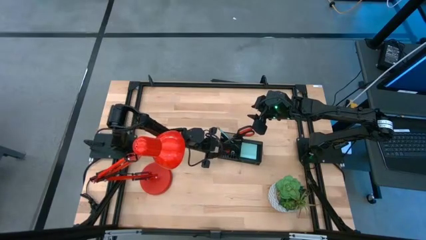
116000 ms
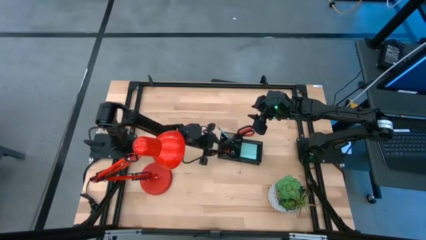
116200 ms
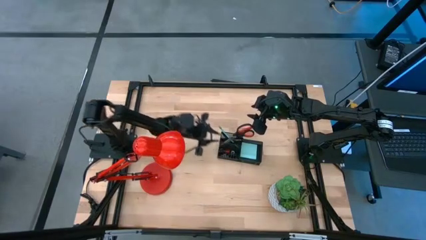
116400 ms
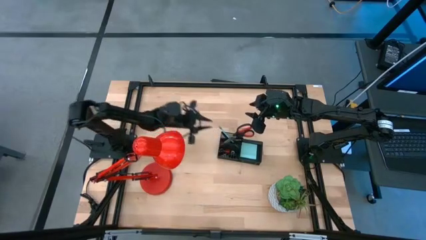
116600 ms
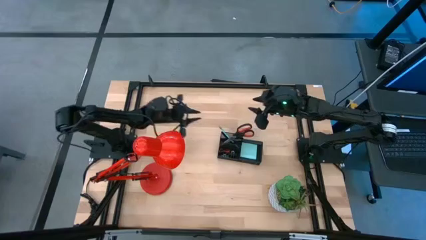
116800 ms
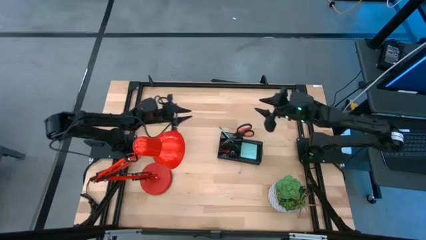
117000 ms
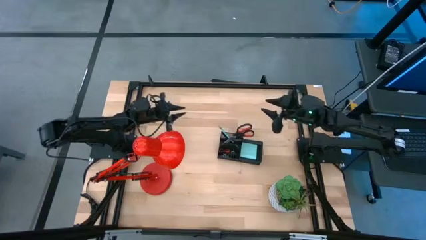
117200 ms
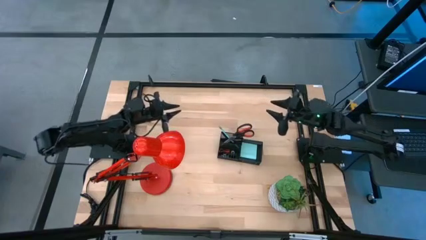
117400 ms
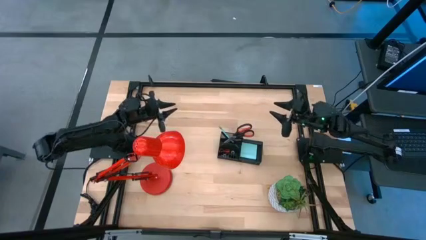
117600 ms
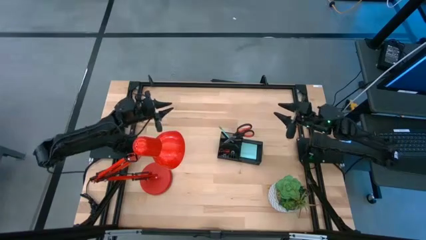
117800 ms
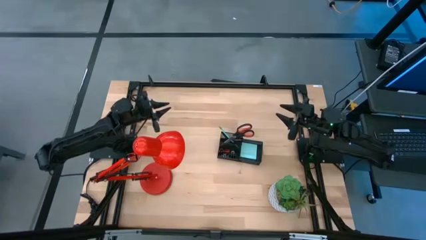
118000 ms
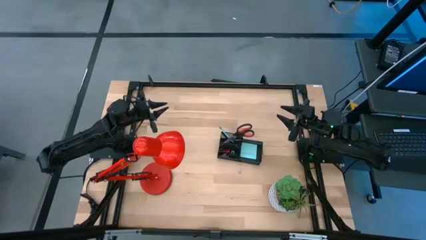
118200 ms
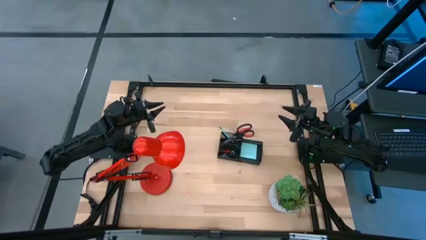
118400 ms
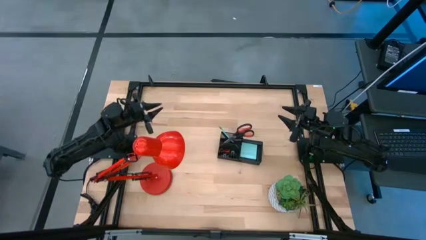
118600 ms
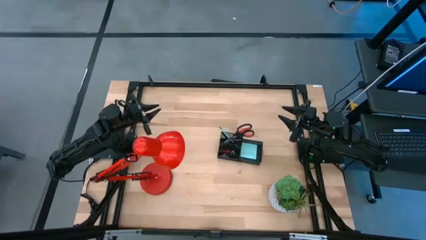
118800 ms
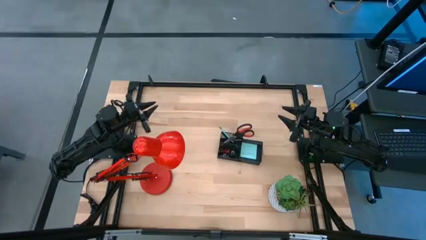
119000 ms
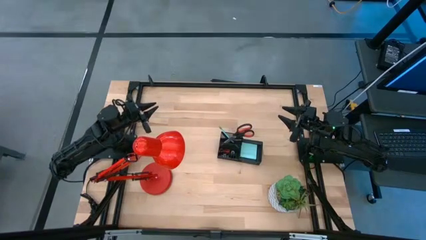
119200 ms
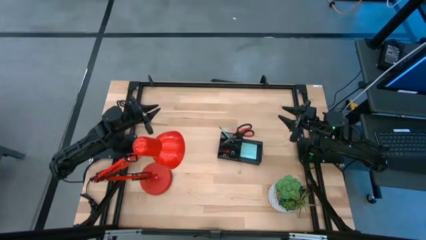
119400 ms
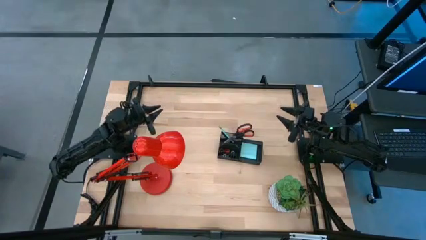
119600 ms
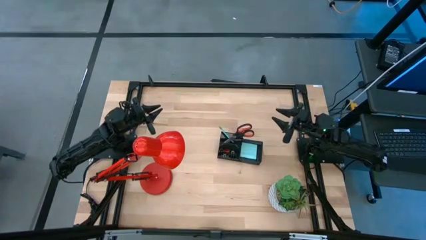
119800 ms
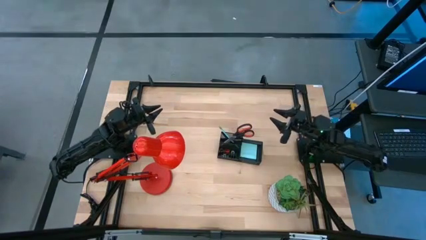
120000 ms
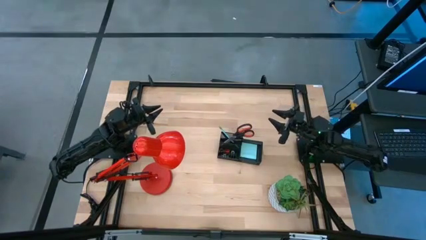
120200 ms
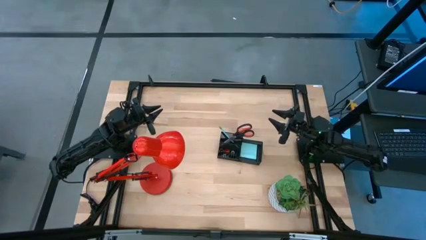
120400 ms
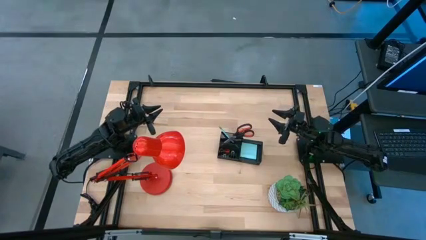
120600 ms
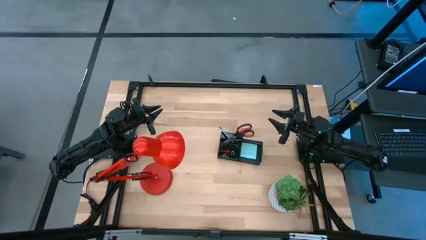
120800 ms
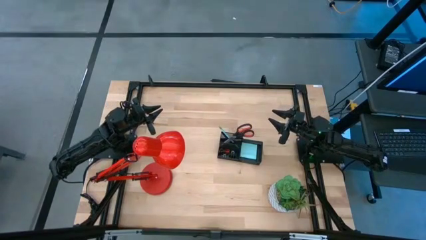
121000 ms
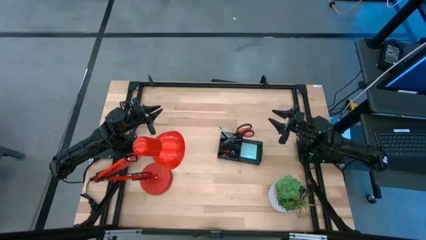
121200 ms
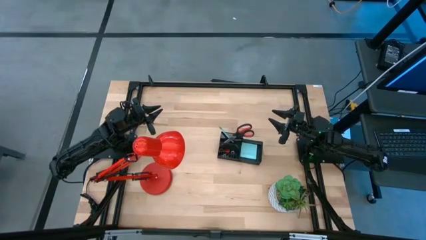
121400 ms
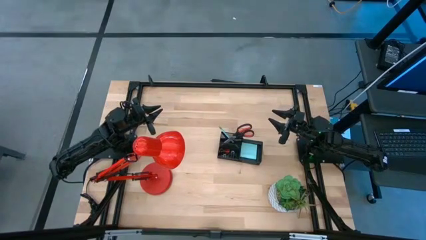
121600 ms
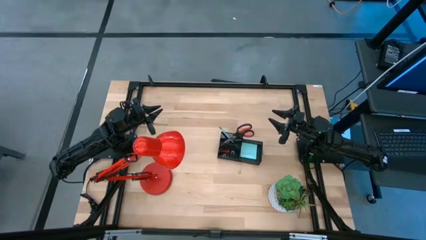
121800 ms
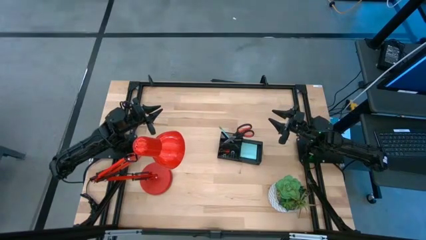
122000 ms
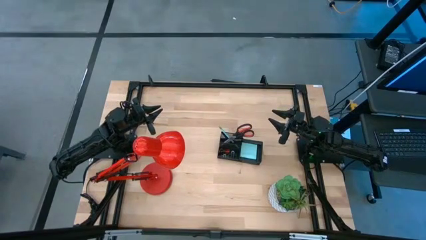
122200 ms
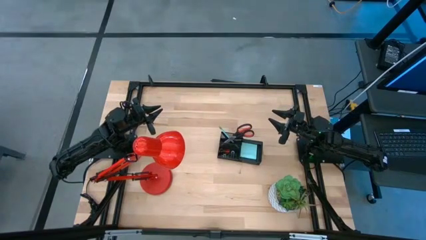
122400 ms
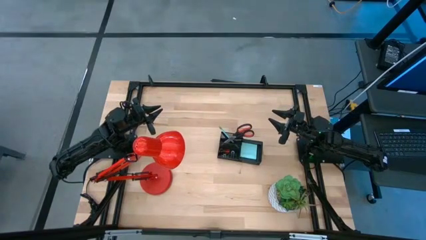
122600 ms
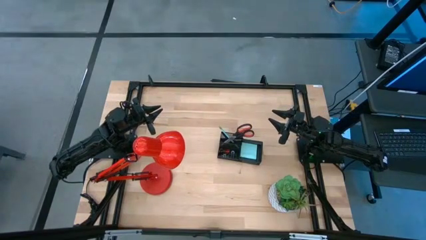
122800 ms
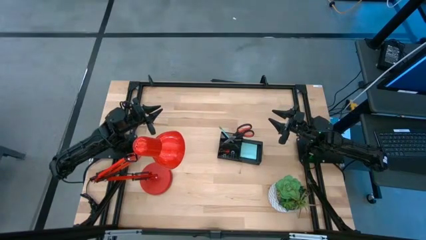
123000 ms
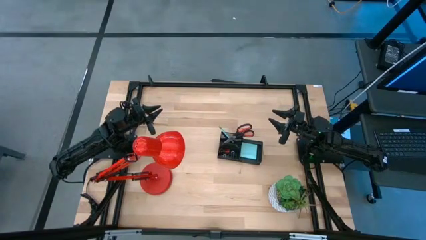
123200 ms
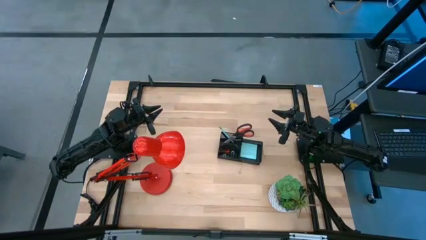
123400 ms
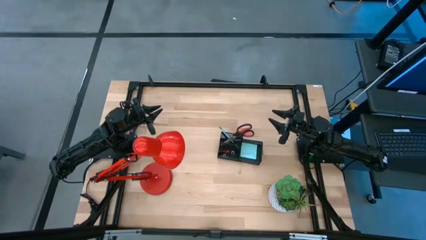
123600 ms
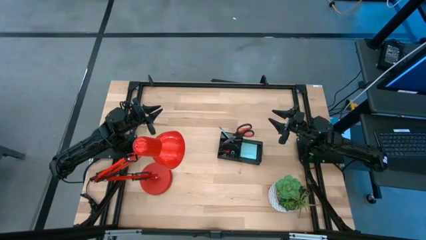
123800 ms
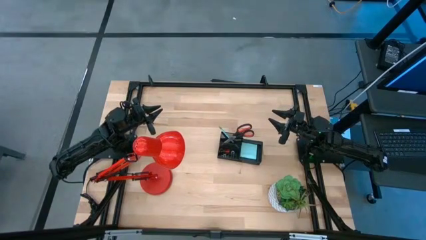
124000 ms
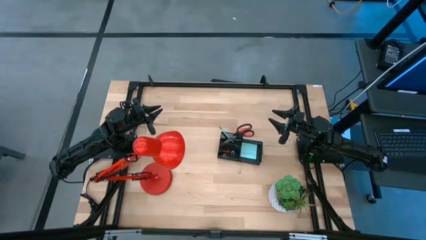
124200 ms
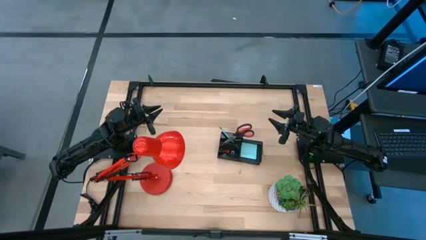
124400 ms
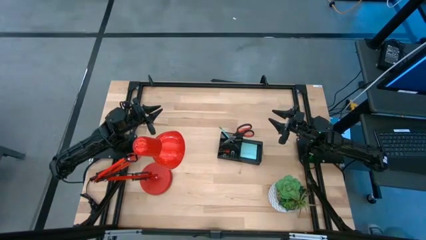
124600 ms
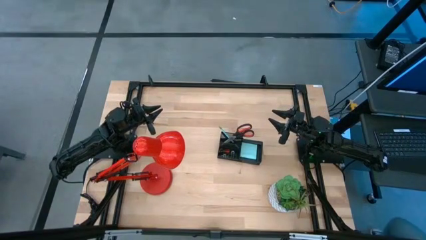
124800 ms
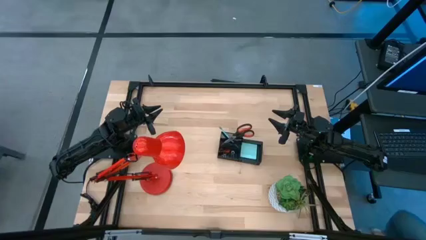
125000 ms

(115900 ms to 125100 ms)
Task: Pick and place office supplies into organizer
Return to Home Position

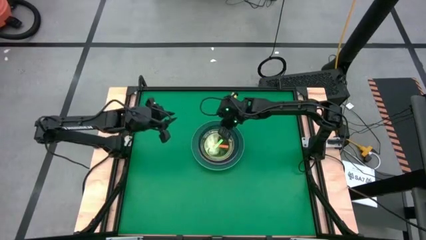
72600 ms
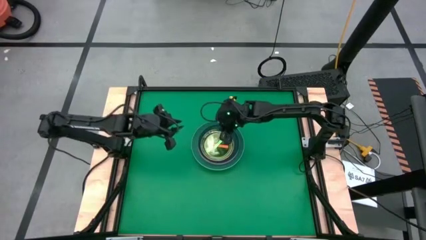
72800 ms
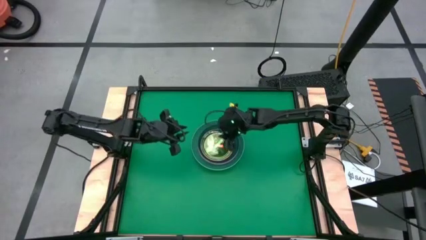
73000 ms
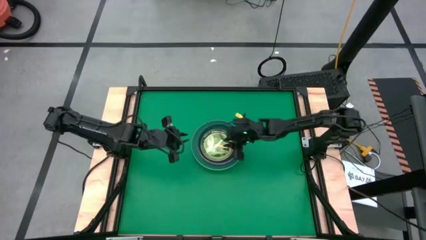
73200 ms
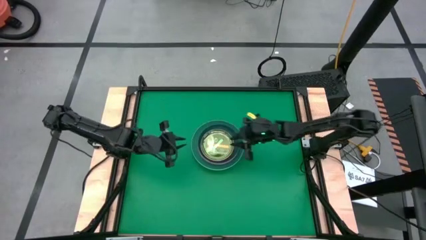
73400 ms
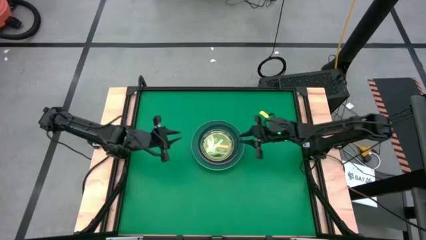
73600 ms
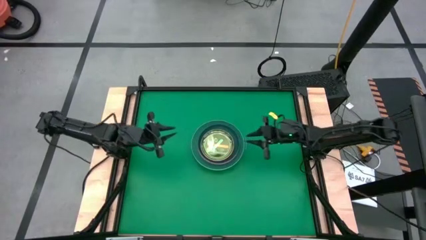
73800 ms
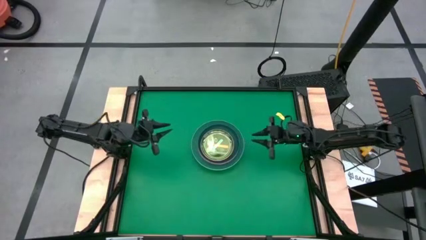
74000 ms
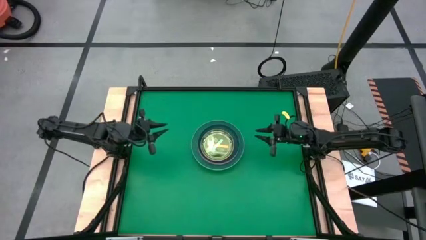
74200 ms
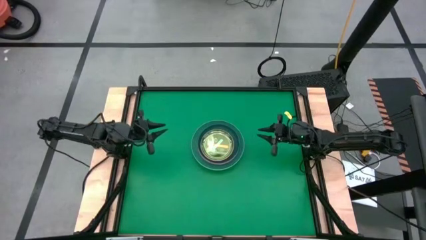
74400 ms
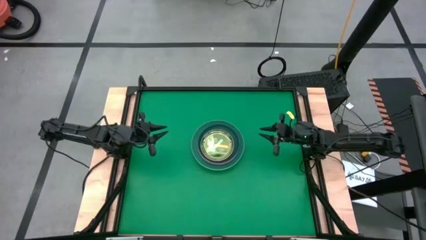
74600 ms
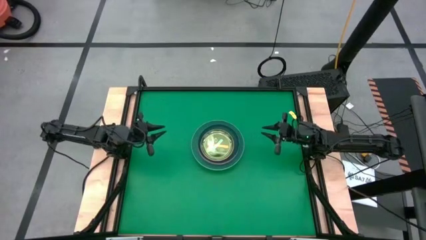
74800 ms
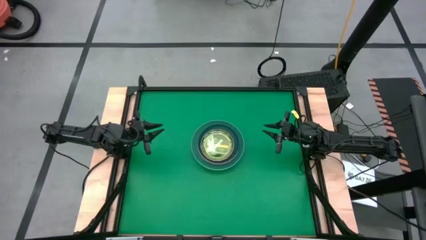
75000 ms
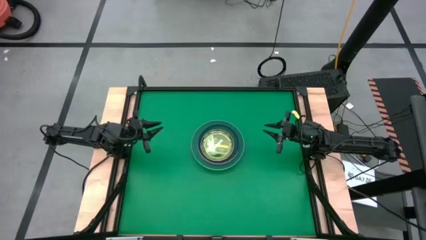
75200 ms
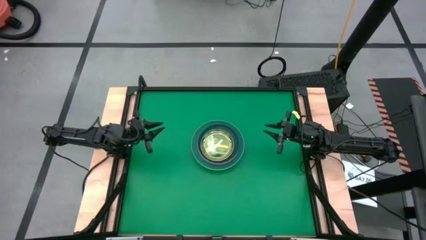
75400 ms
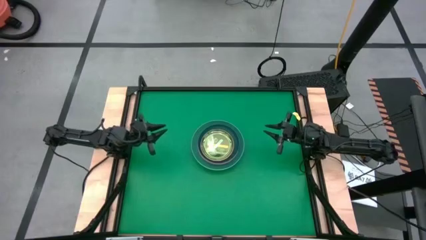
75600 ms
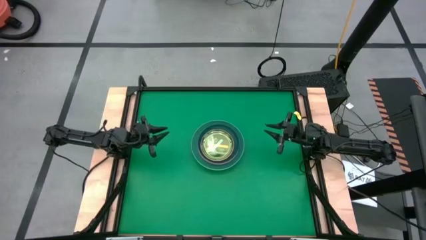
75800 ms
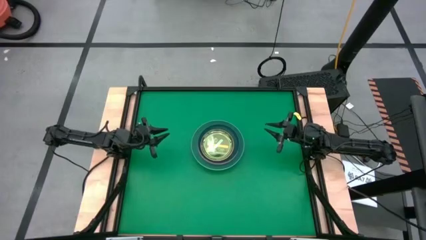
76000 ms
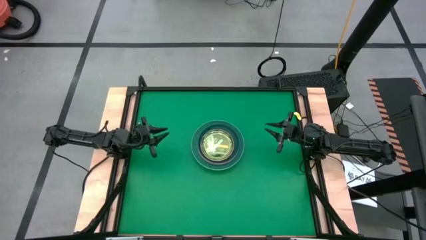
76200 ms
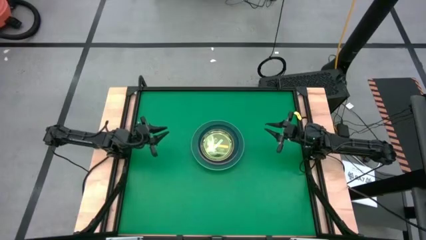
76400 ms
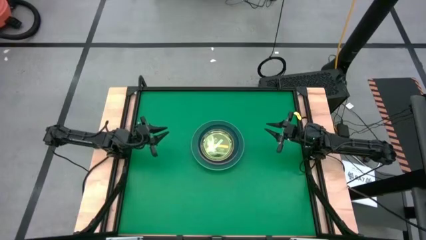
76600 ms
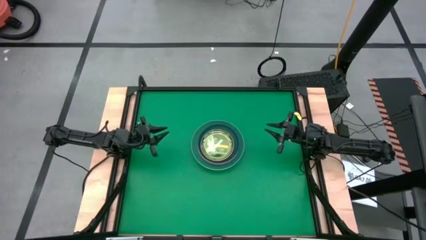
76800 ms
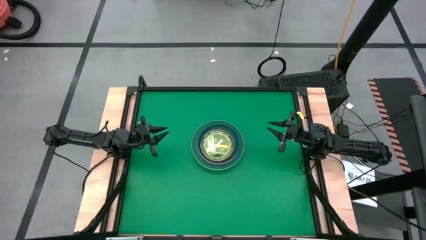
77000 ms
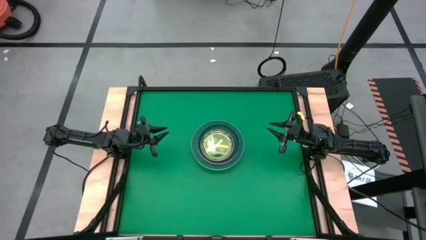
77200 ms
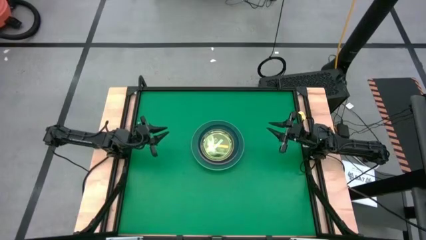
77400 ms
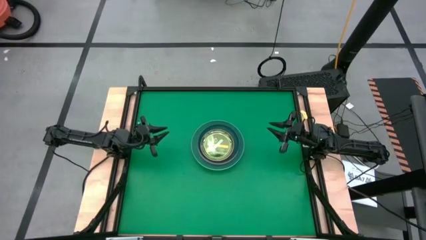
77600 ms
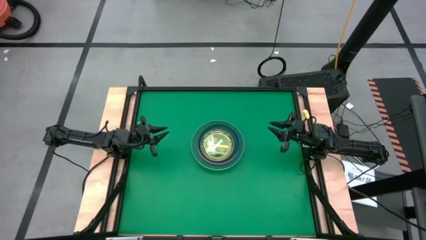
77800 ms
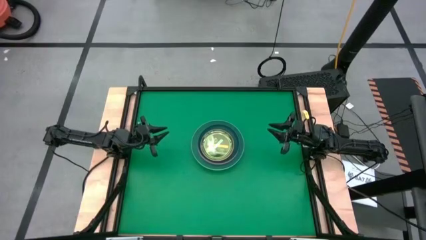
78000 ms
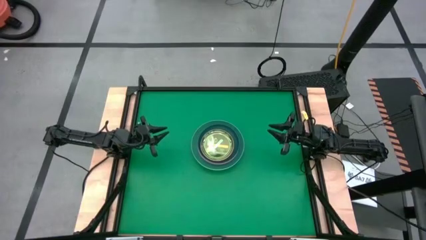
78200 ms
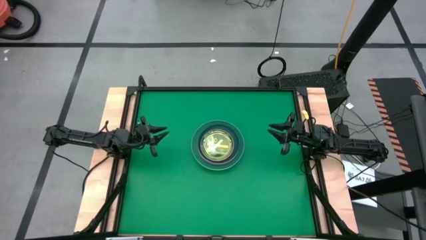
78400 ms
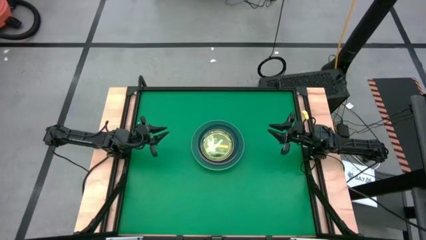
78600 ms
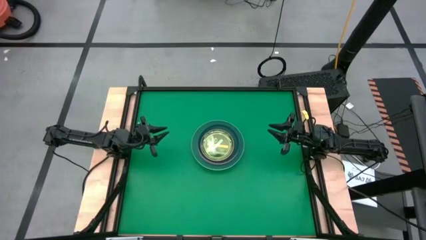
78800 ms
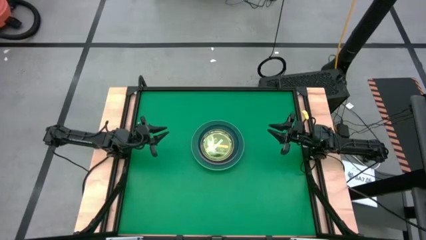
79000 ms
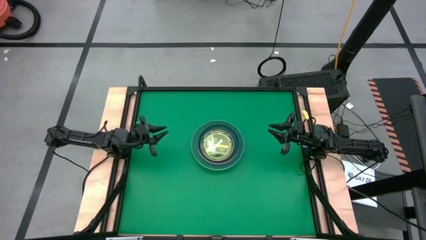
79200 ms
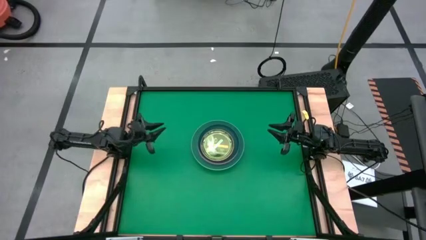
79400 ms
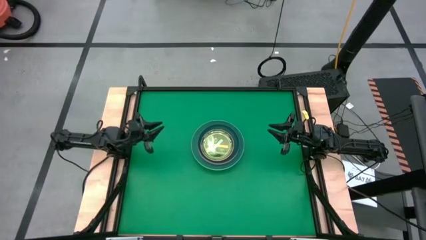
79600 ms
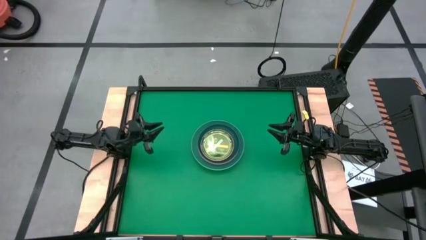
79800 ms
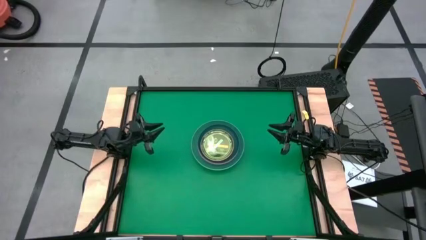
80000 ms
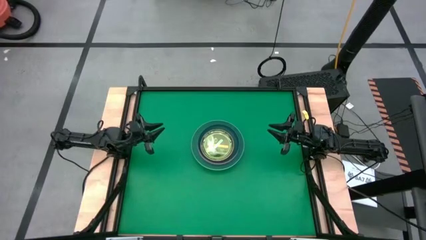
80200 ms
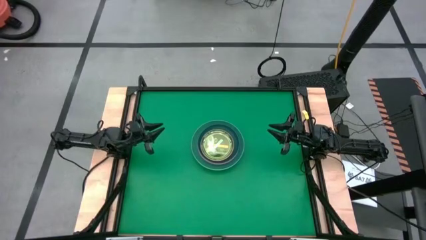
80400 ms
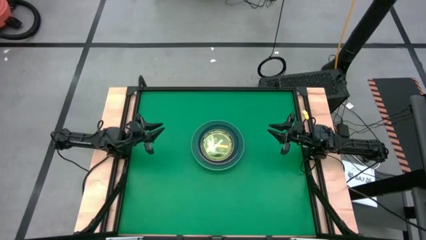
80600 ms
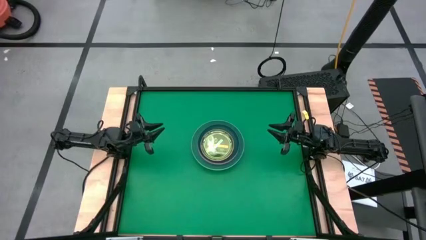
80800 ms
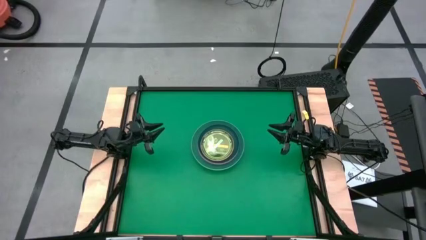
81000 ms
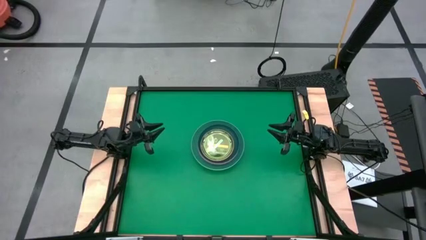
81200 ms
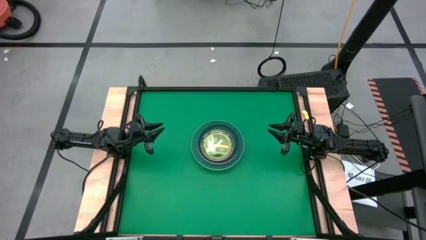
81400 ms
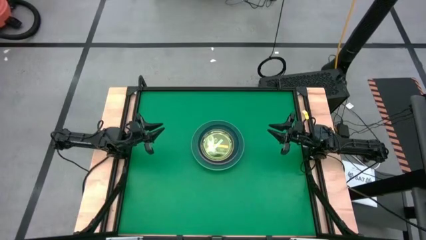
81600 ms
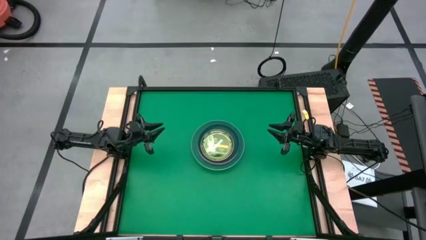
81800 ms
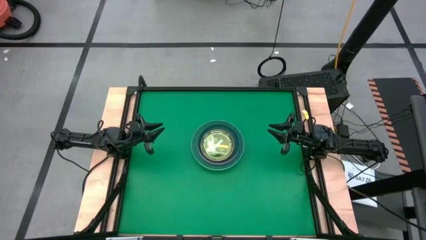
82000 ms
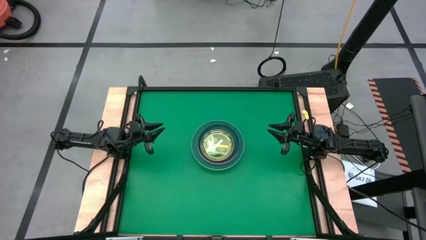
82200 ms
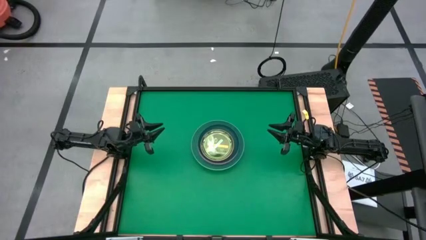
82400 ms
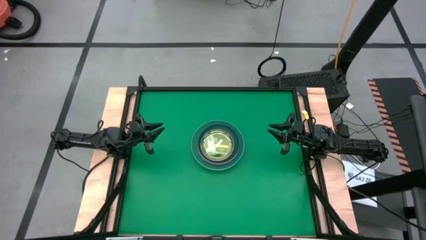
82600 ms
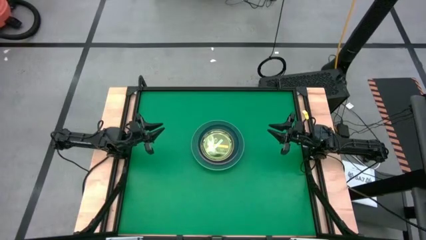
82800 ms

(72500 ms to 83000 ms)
Task: Stack plastic plates
Return to Home Position
